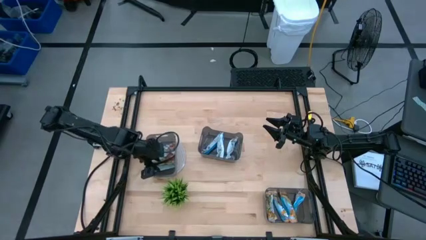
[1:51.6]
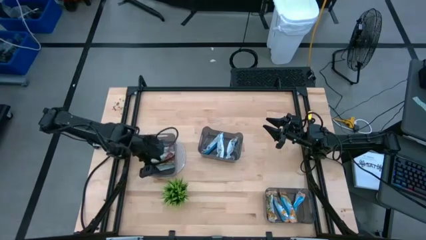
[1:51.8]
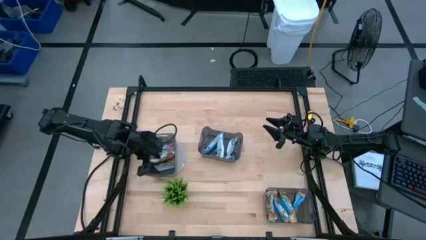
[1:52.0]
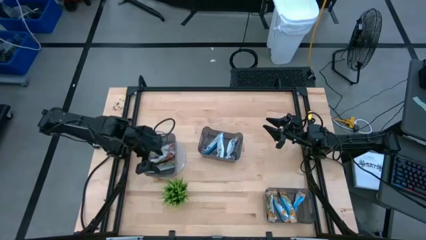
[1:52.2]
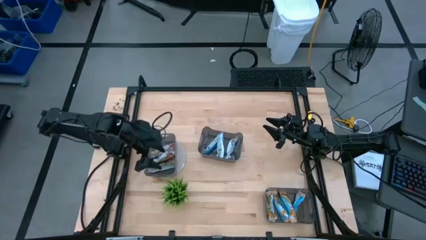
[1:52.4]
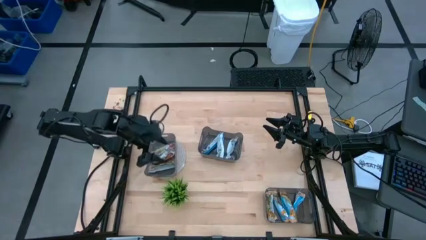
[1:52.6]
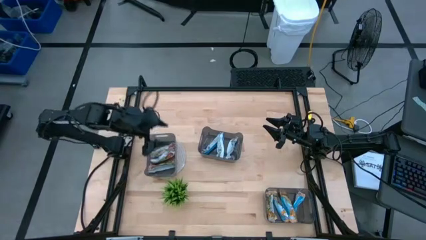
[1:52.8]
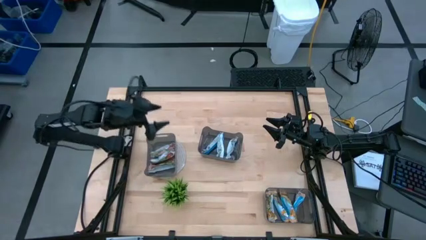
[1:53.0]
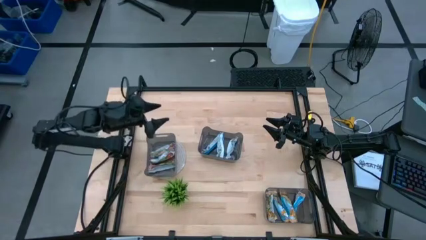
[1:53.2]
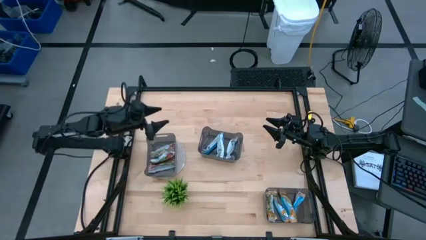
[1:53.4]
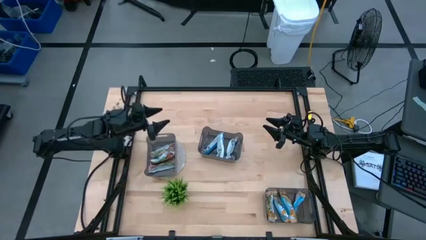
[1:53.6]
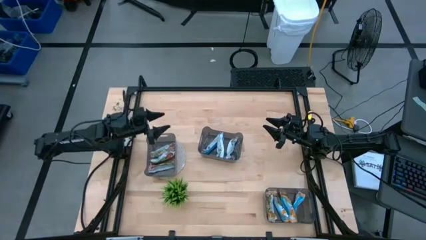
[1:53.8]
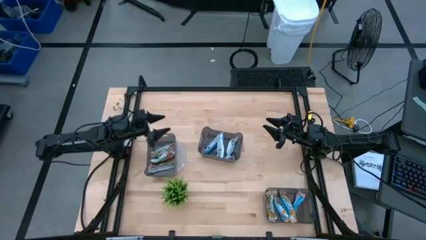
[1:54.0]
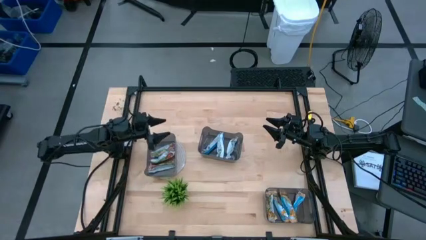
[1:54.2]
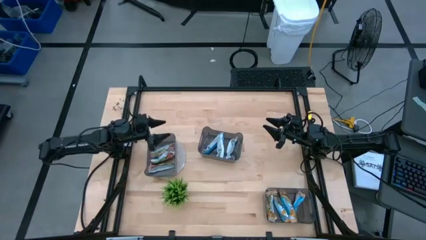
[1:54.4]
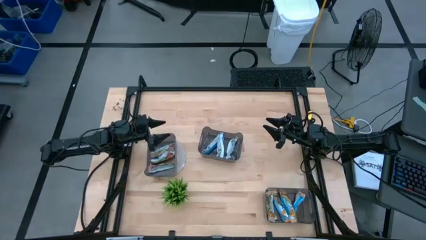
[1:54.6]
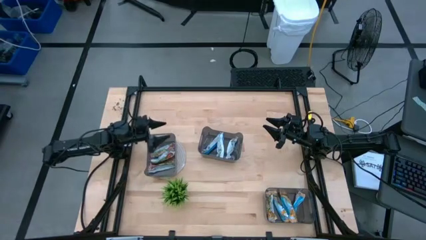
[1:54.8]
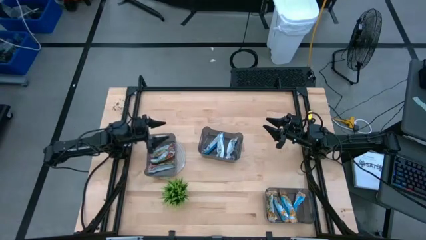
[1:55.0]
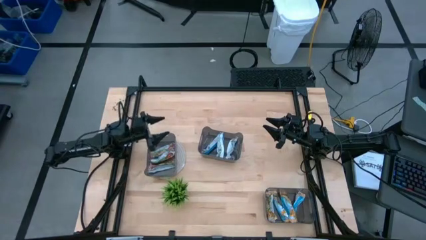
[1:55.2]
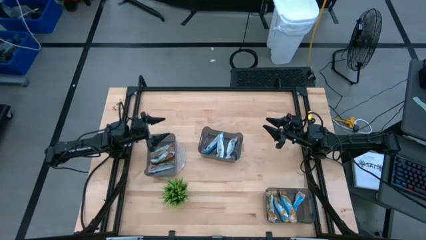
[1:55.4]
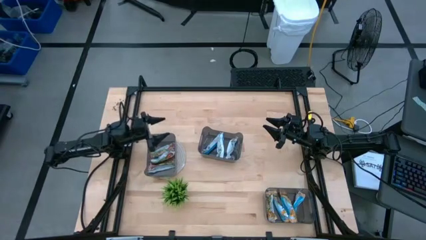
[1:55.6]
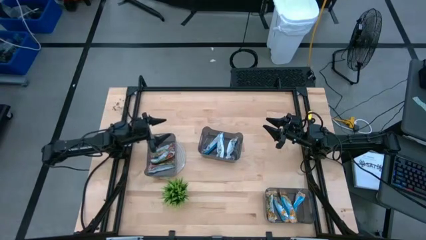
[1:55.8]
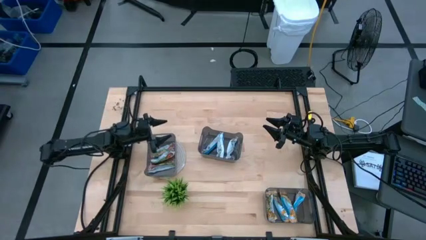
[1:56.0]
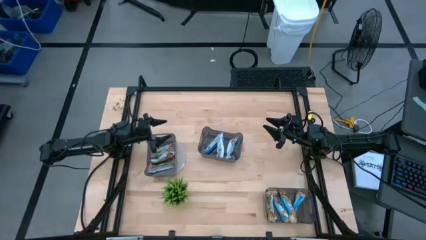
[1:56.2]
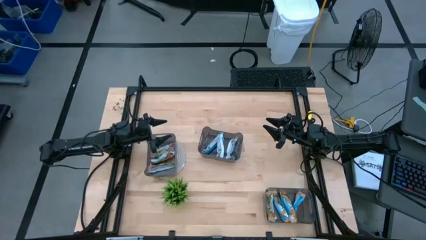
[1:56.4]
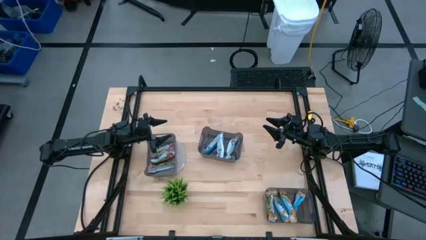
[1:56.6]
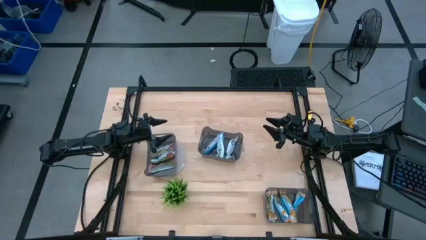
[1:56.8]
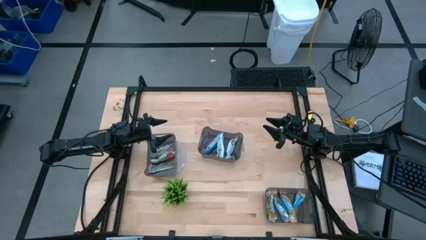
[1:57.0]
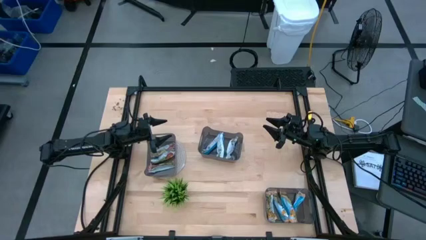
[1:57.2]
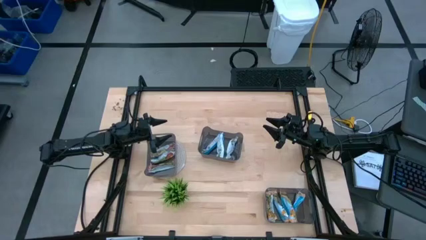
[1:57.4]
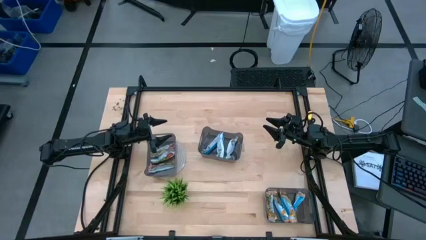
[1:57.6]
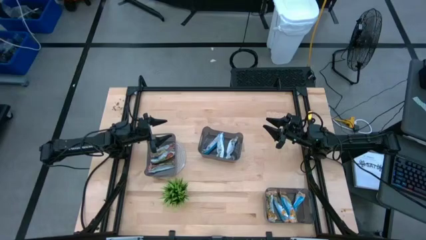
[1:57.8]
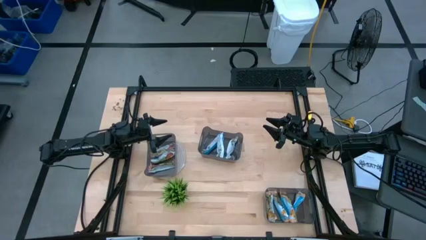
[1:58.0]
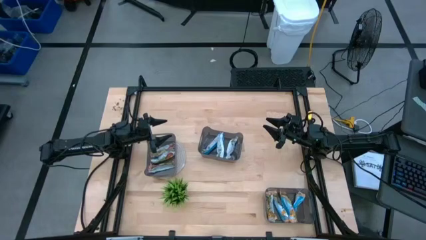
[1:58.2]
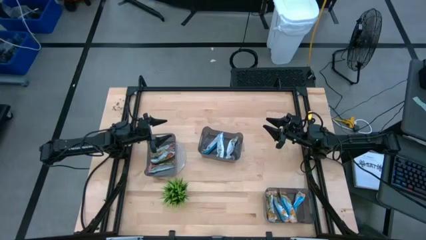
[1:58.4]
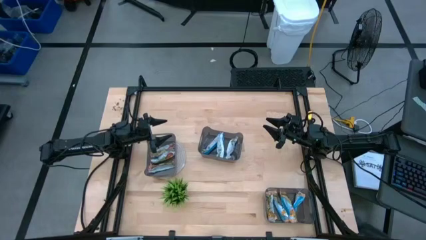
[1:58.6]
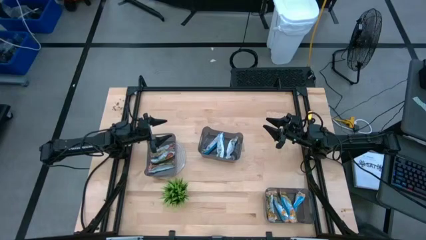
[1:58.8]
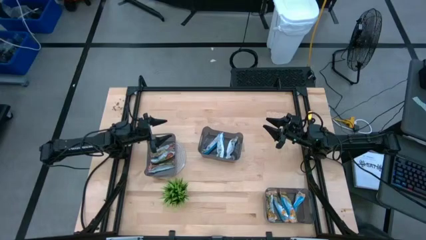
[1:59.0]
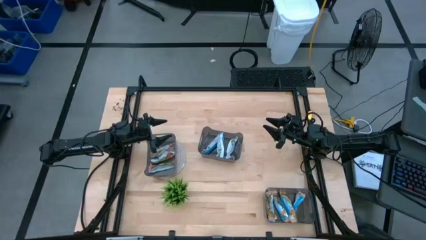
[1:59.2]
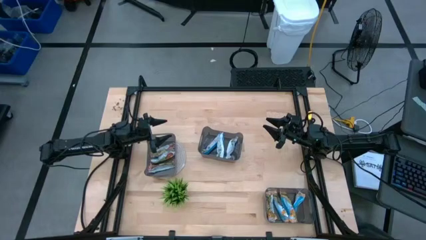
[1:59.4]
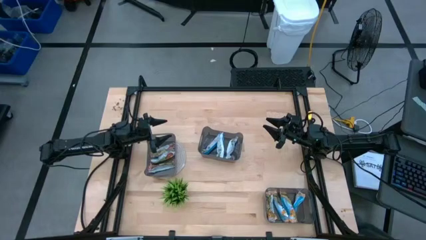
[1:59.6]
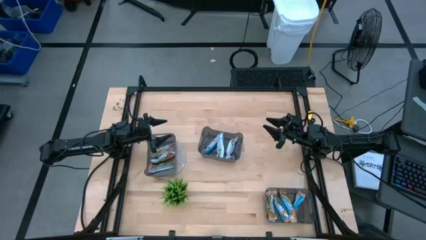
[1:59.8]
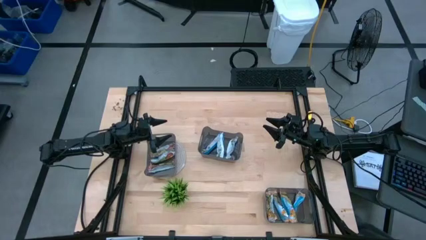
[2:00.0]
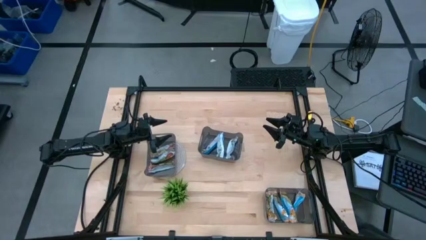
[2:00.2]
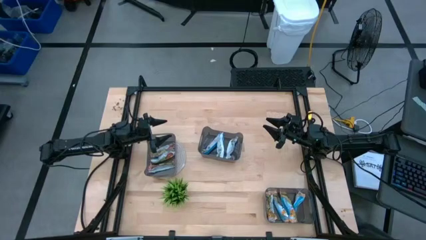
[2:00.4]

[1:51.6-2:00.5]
Task: Pick and place Granola Bars by type
Return to Home Position

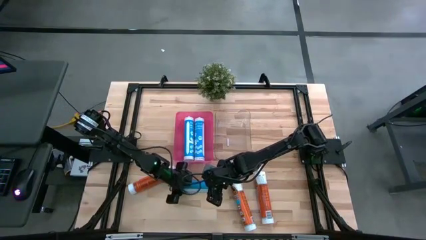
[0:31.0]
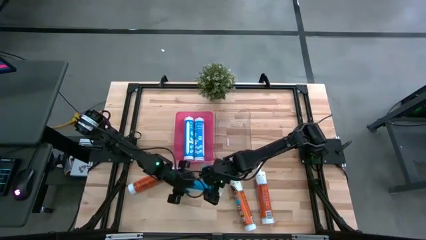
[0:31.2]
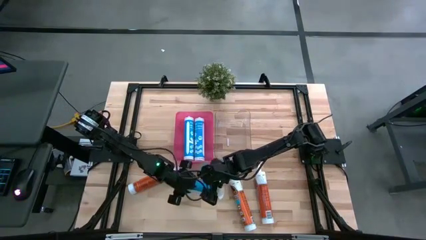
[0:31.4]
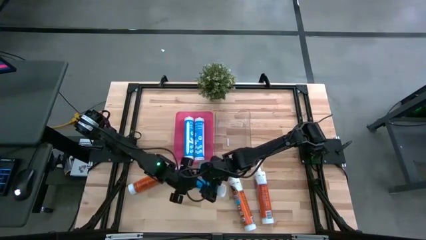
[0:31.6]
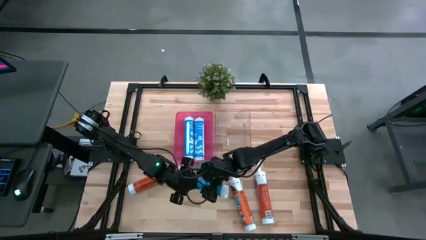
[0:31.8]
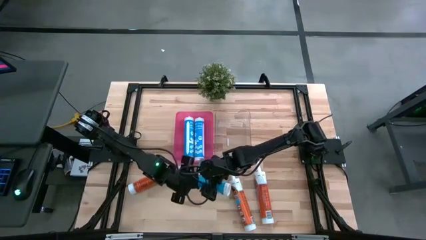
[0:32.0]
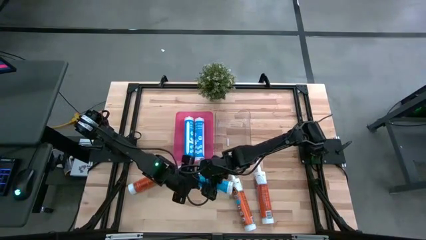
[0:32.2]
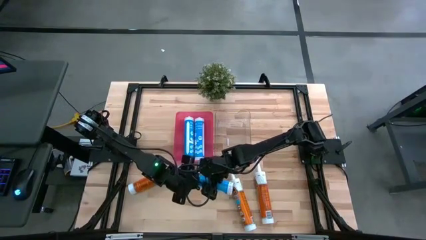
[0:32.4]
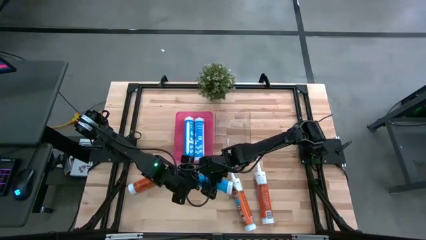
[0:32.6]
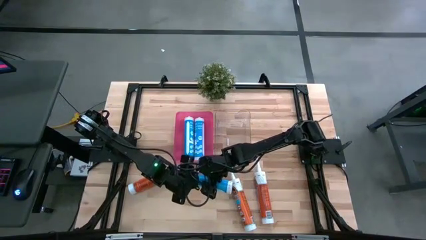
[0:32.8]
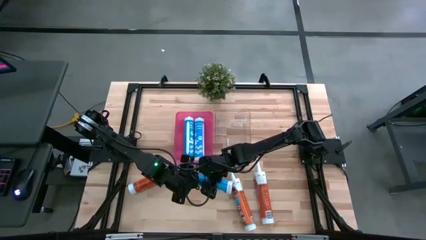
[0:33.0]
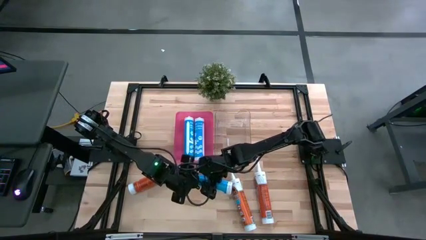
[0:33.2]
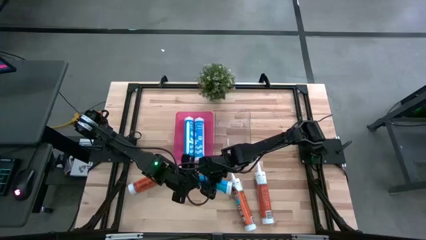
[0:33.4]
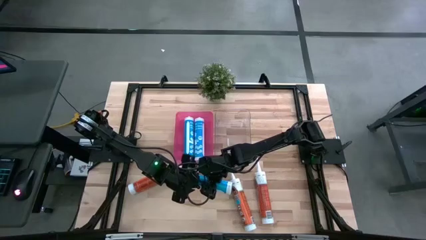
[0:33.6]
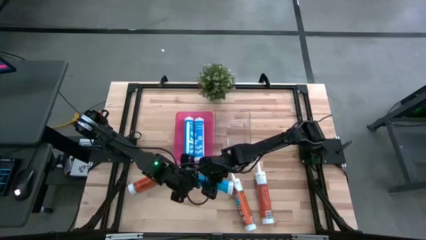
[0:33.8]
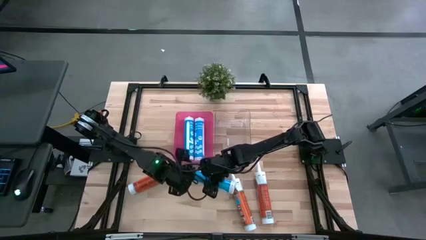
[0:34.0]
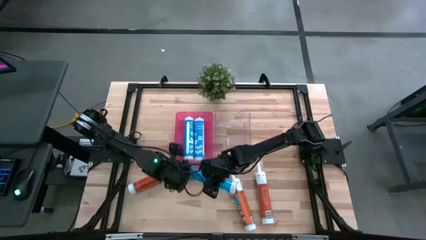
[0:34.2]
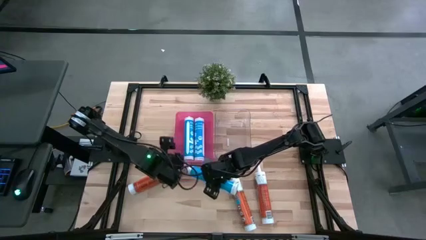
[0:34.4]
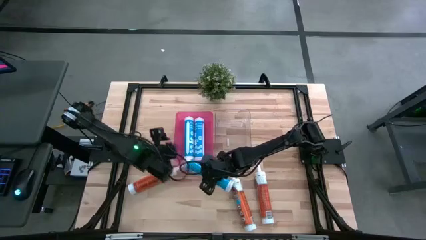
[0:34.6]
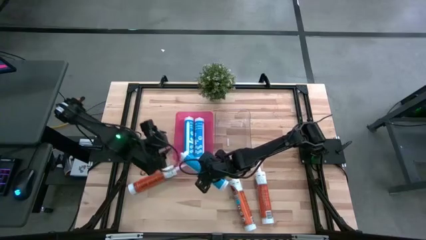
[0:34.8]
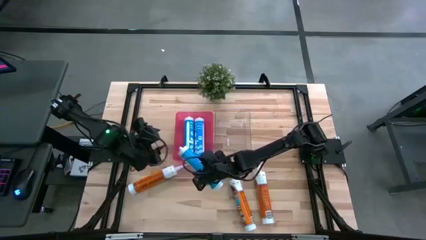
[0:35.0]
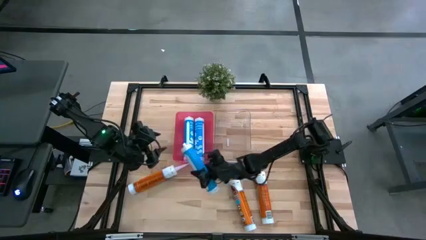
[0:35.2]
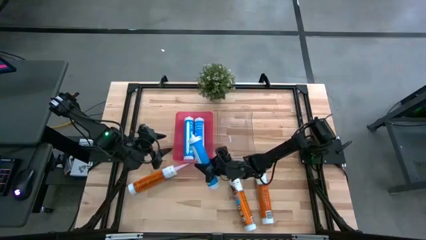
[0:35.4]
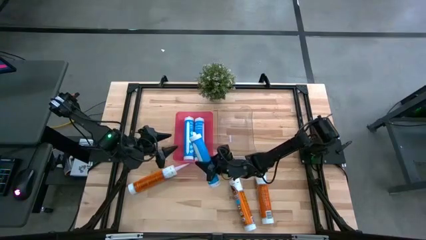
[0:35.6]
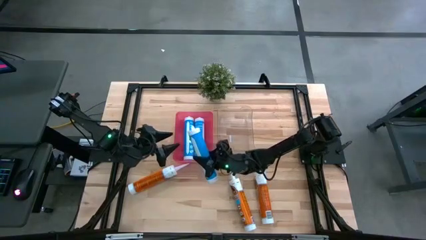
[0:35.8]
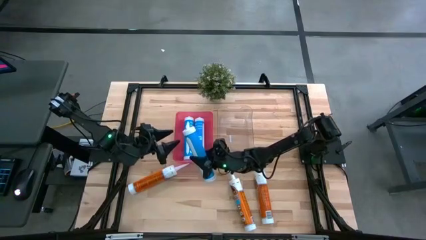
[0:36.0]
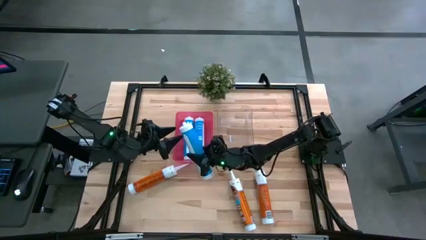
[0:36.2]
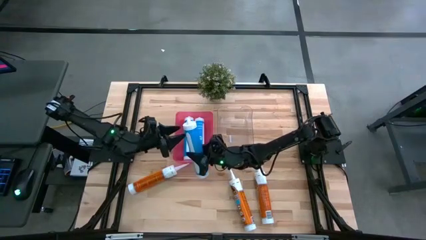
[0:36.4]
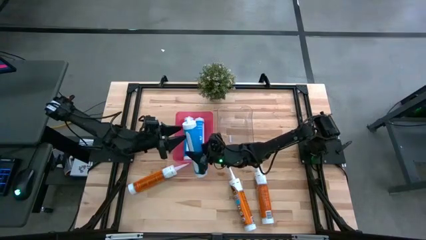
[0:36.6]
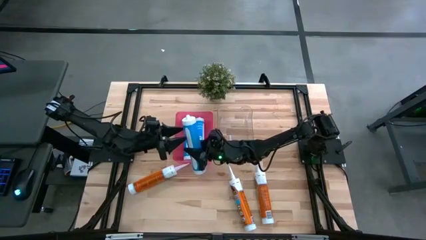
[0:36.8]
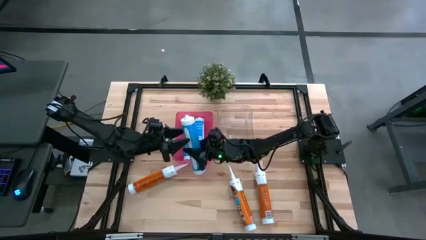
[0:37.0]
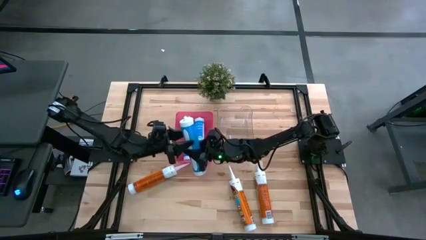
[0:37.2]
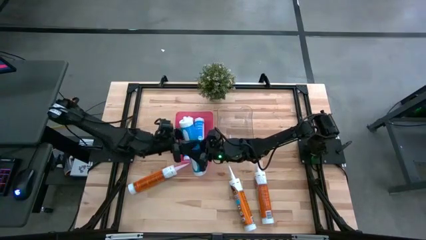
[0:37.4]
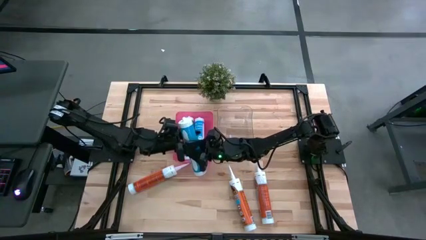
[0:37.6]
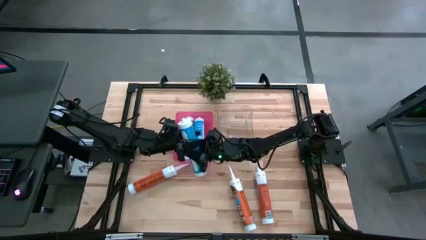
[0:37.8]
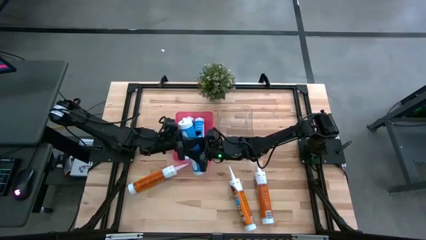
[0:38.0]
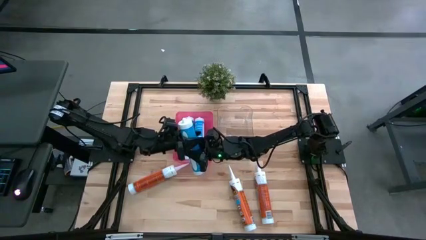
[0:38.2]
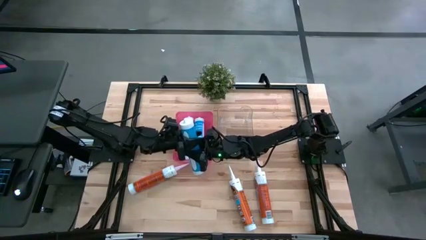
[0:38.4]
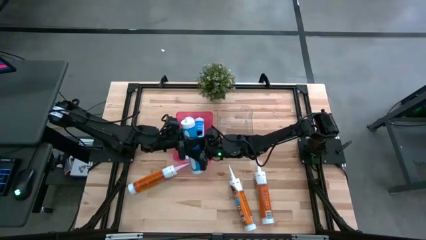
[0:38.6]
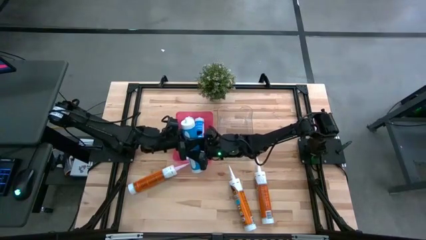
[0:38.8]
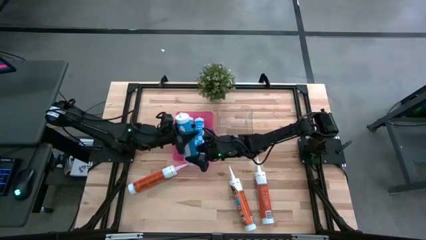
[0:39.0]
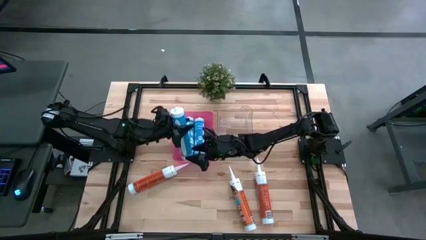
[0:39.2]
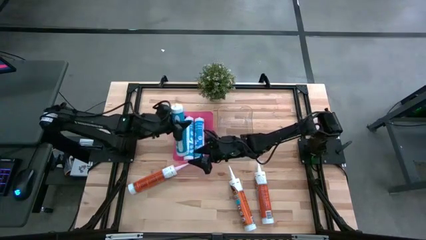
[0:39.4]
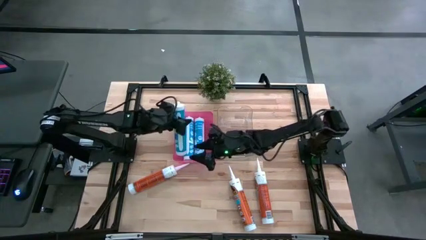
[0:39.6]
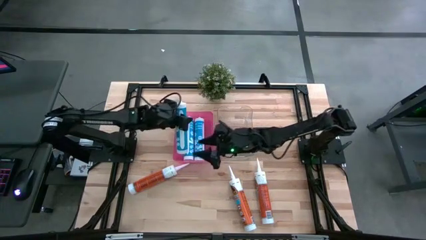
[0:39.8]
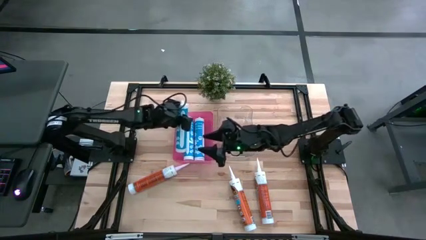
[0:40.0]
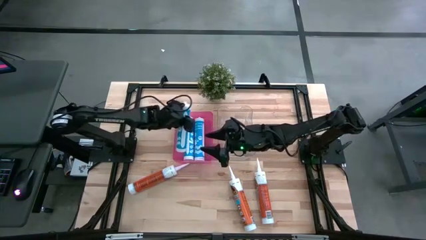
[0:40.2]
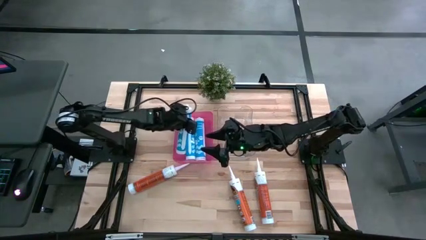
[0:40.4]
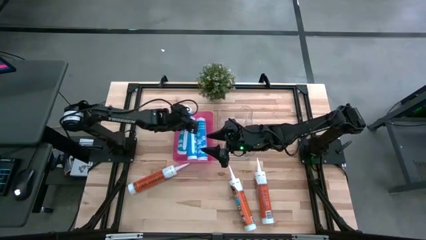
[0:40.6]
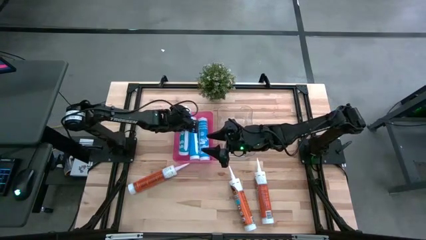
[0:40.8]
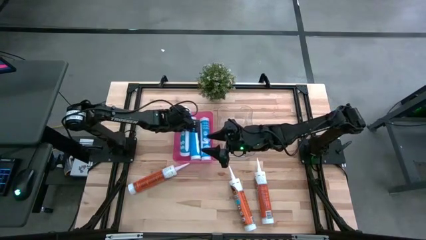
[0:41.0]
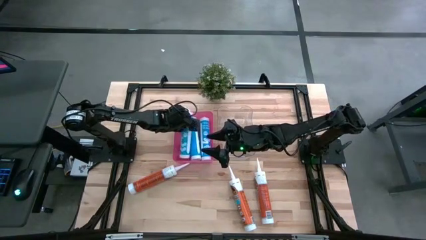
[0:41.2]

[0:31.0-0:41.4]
Task: Pick & place silicon tubes, Sealant and Lysol wipes
Put the blue sealant into the pink bin
